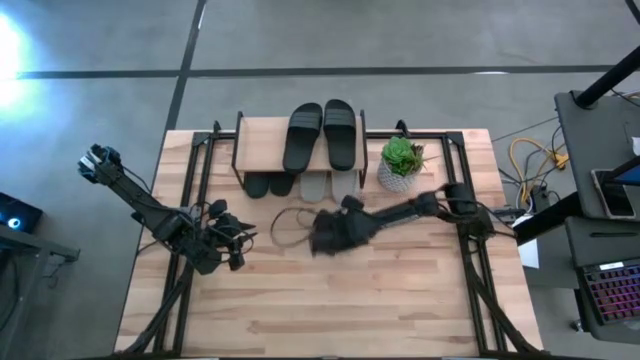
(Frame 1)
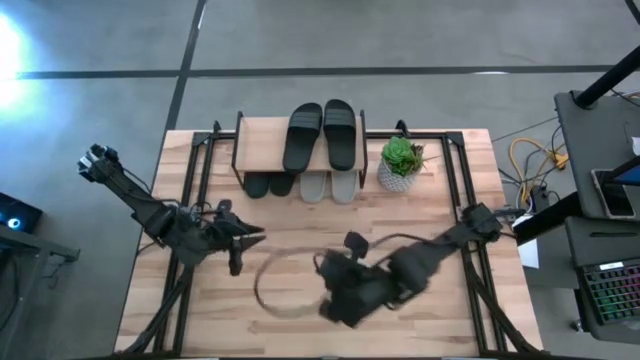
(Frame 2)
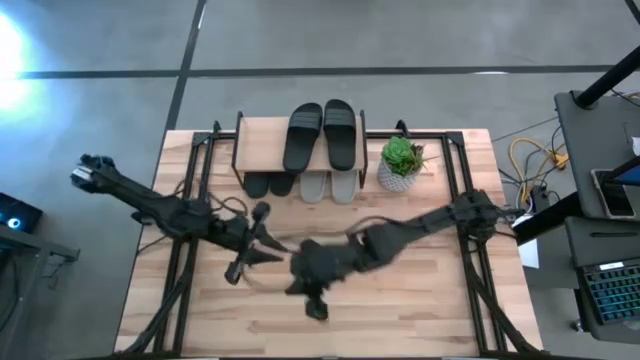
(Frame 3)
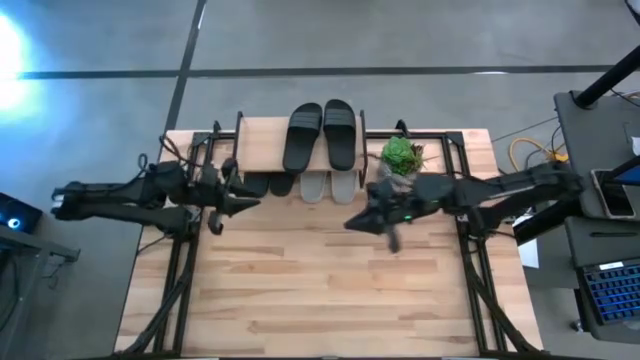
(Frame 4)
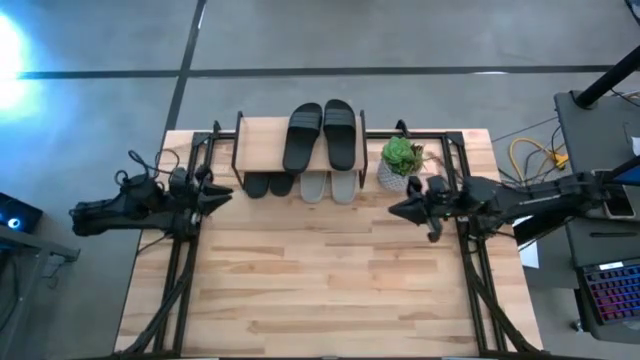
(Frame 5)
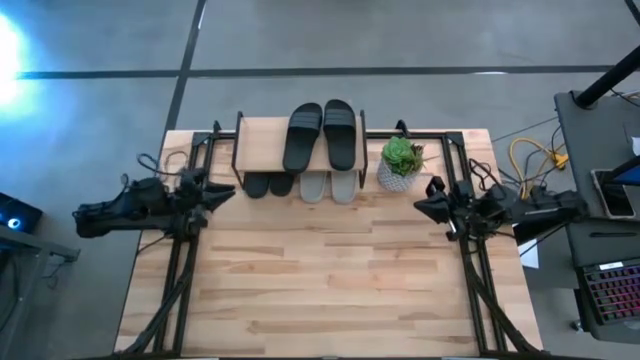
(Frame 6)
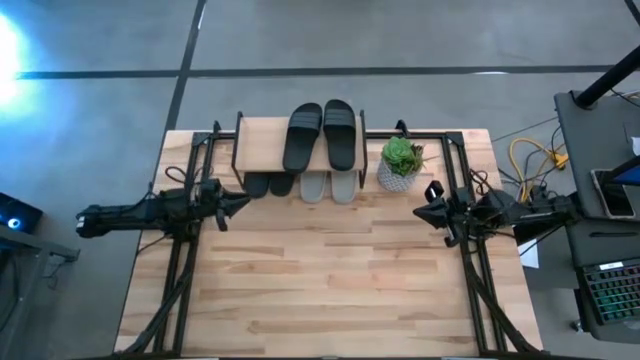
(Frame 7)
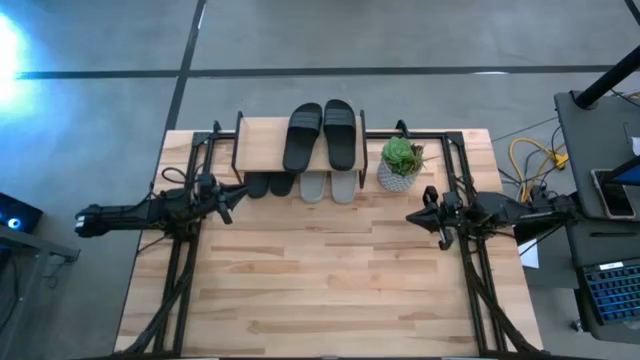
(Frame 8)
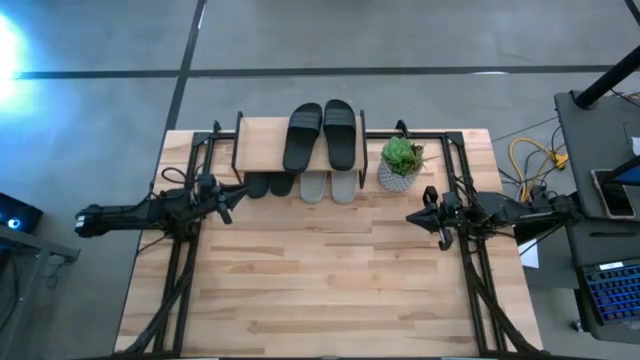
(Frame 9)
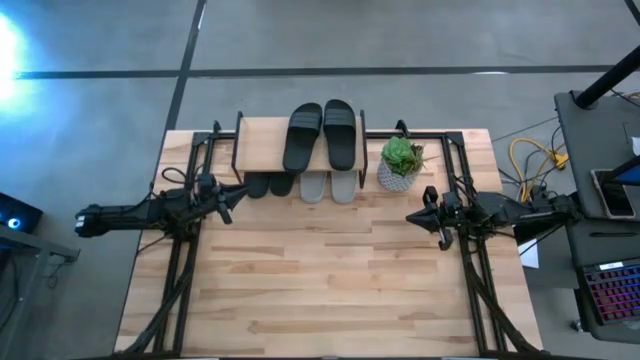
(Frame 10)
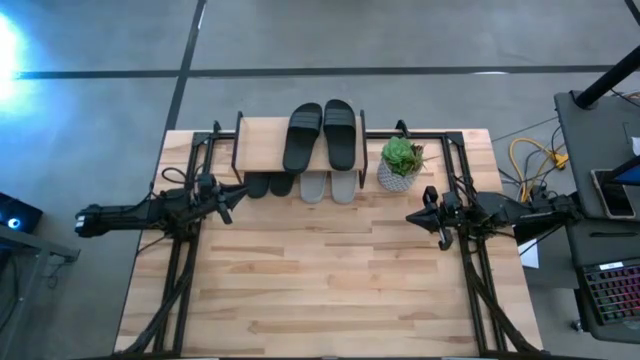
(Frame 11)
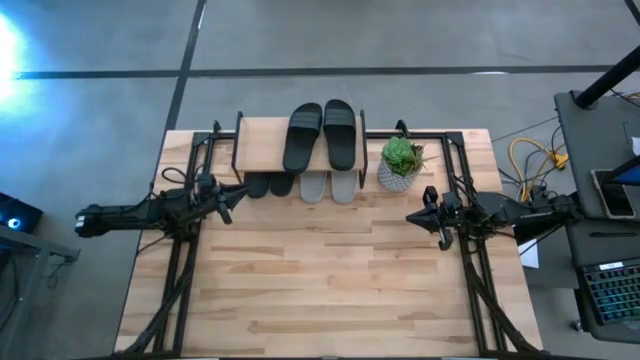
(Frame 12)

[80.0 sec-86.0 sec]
Task: Pick and place slides into the shelf
Return to Home Position

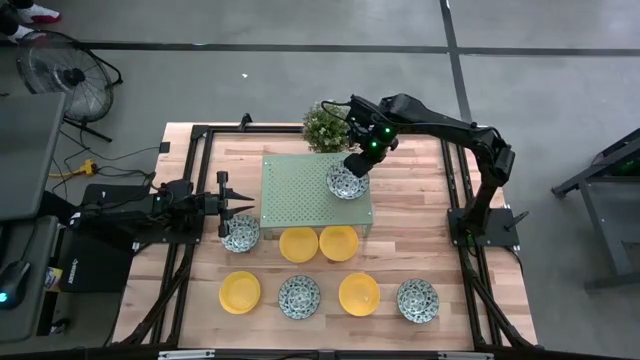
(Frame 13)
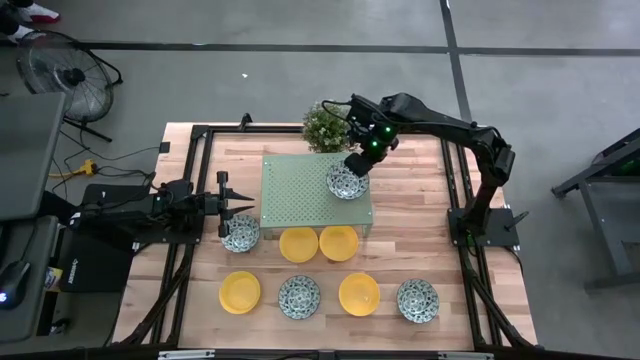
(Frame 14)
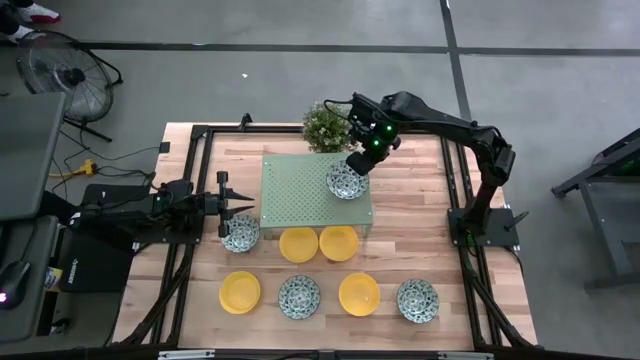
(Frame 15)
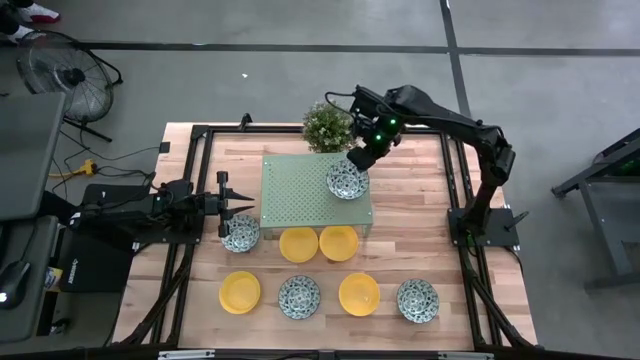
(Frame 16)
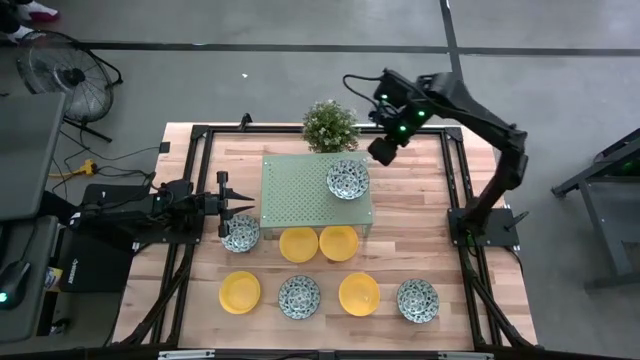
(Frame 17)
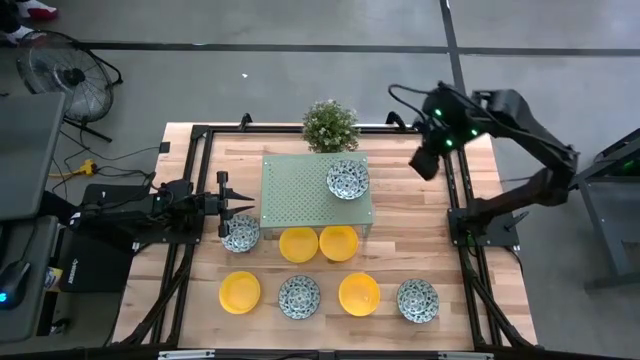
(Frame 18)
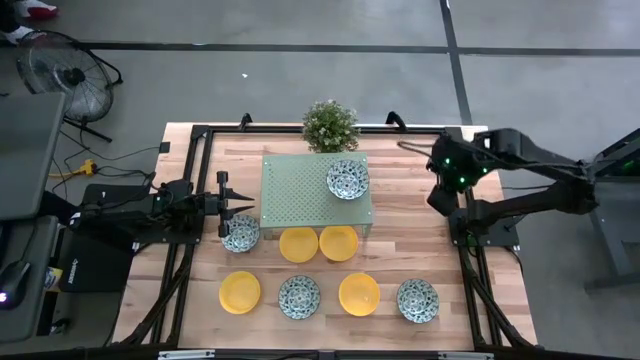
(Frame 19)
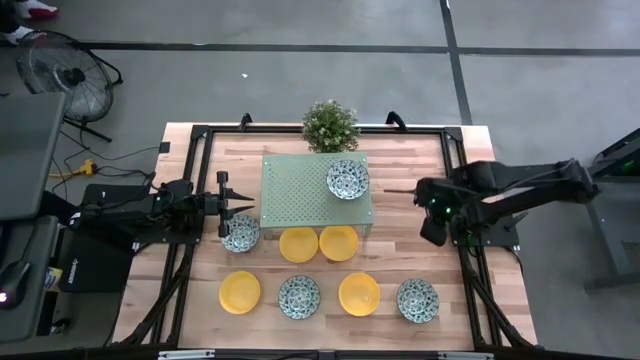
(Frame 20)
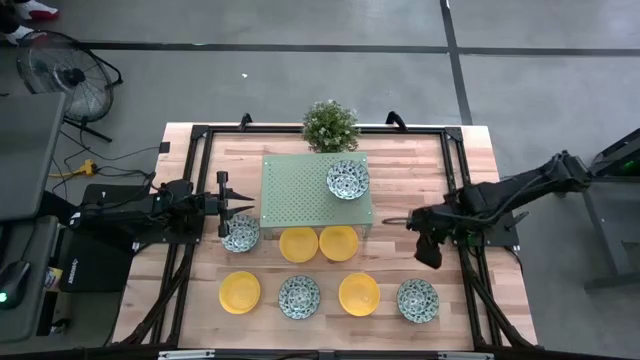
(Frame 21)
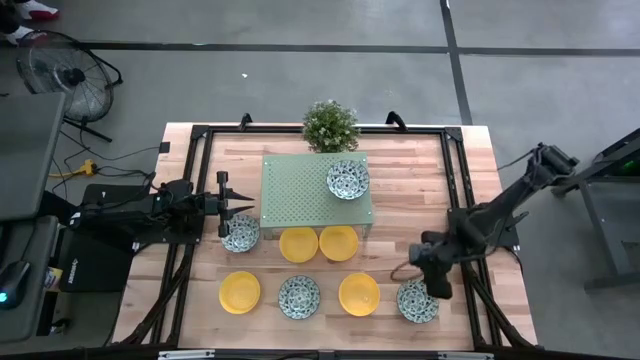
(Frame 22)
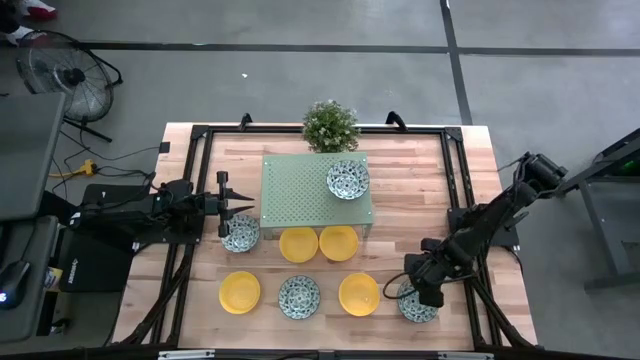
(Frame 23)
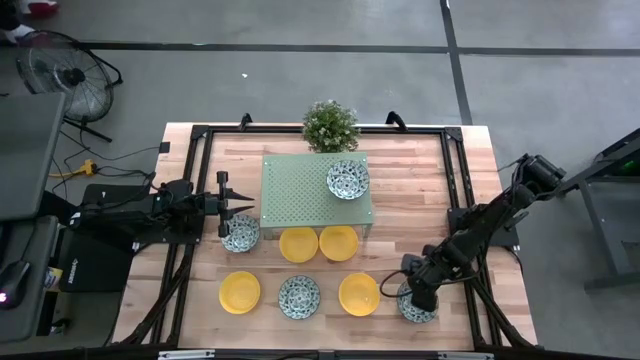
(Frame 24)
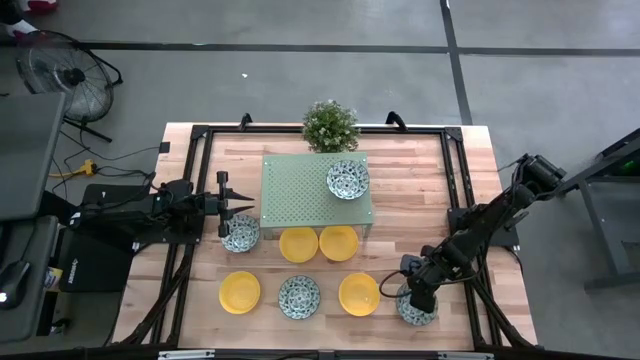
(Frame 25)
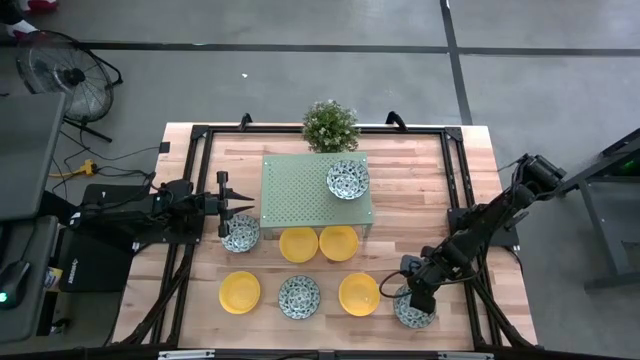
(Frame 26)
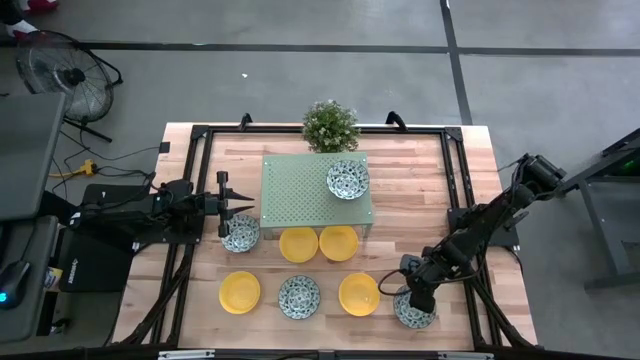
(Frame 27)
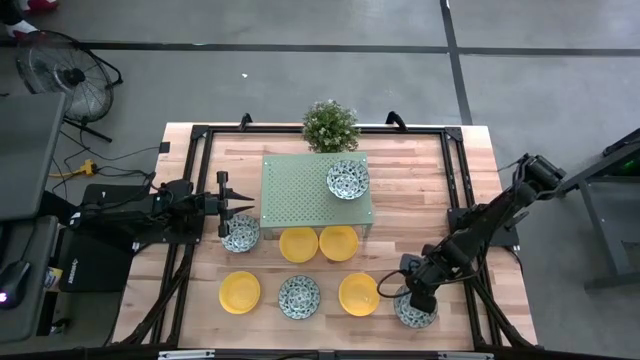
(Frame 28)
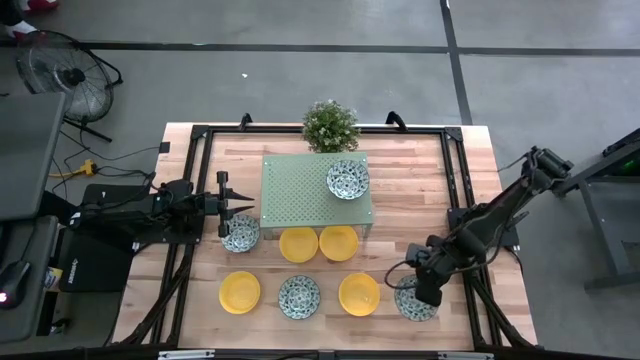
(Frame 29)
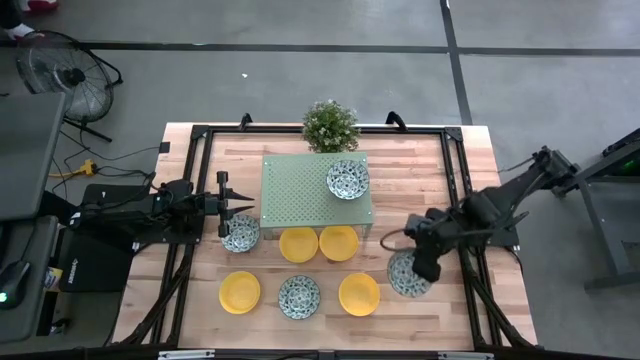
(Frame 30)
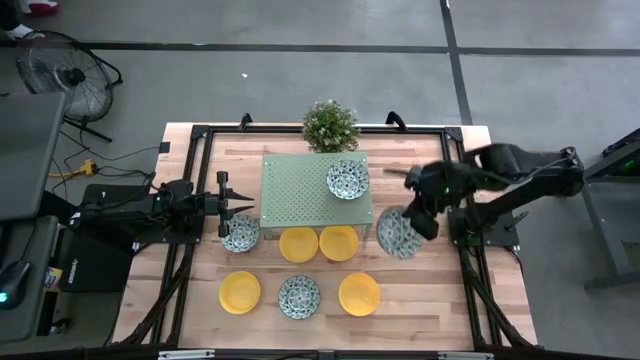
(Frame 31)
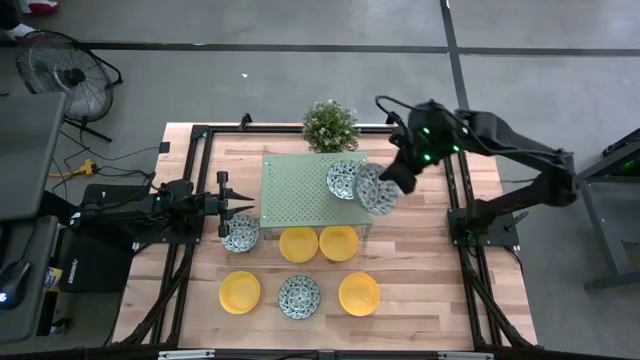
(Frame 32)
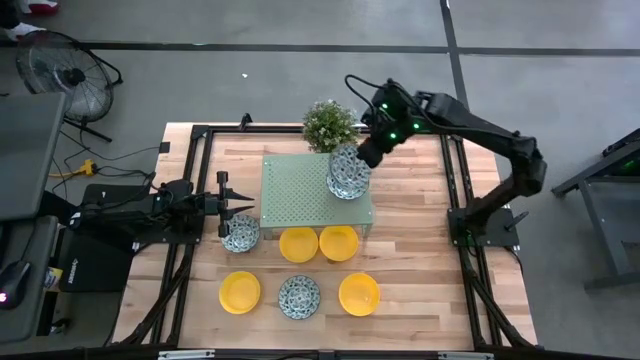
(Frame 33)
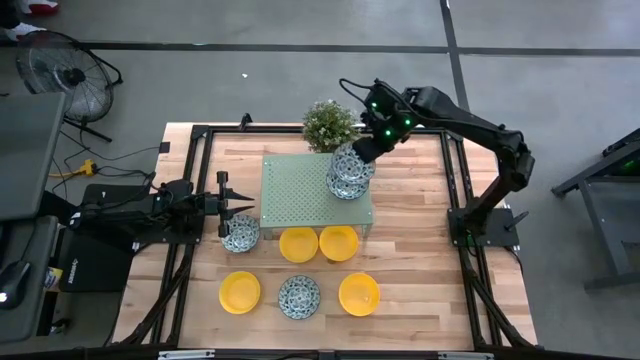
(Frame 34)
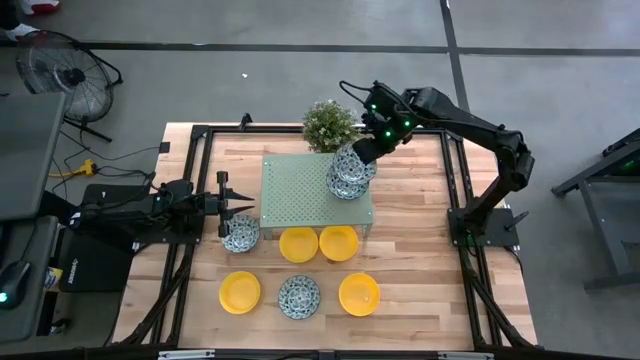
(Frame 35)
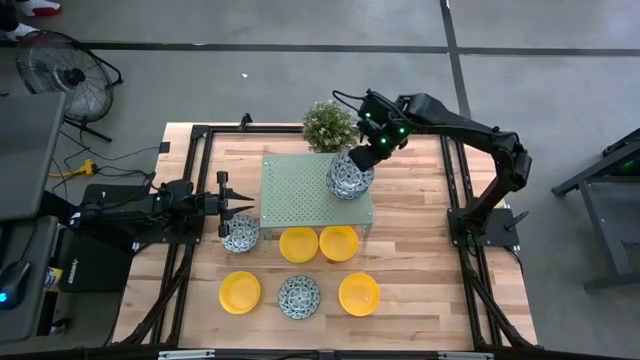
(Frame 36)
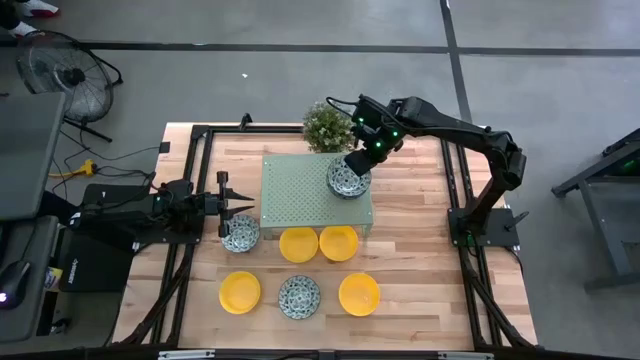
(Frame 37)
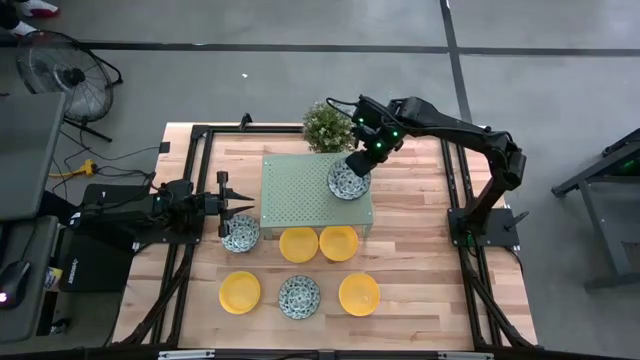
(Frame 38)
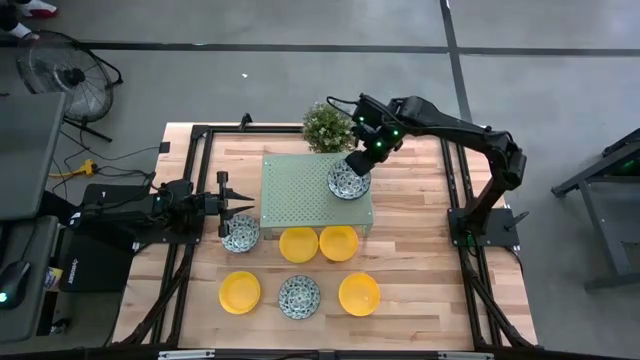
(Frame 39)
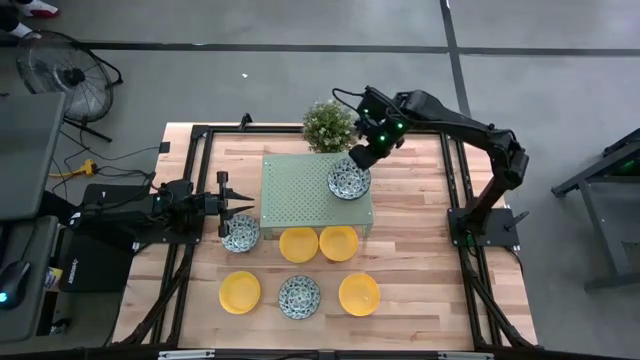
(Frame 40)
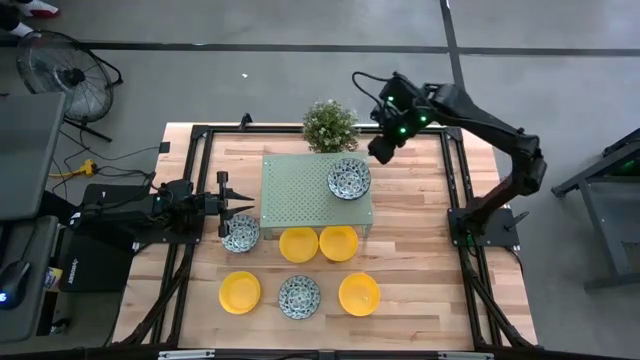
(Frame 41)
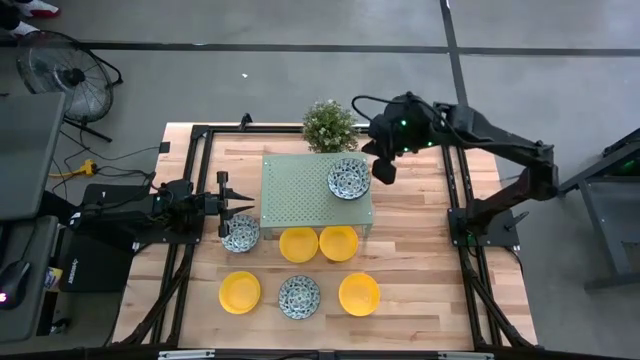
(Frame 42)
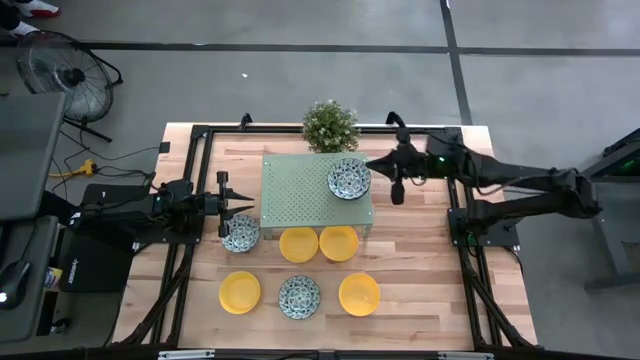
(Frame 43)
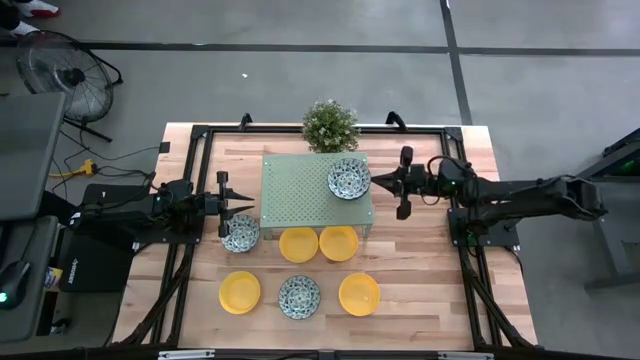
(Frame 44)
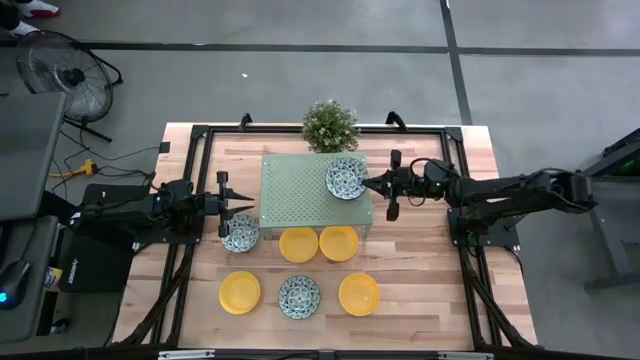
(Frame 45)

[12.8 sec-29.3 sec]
Task: Pick & Place Mini bowls
Stack the blue patterned bowl on top of the blue patterned bowl on the shelf
